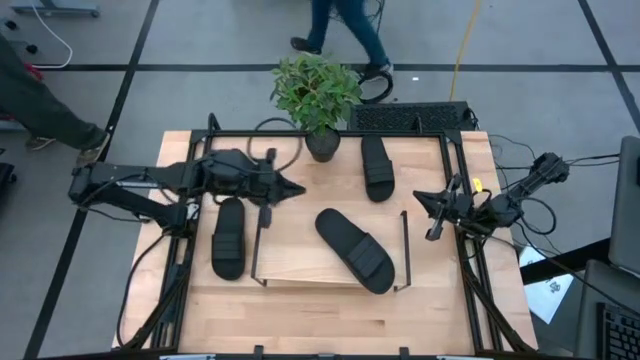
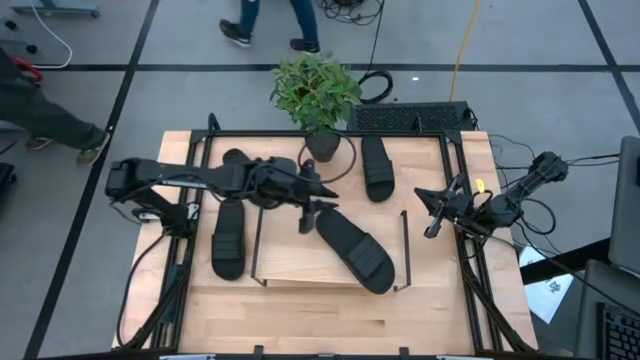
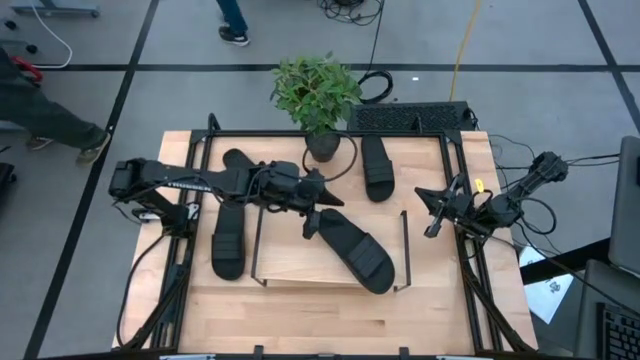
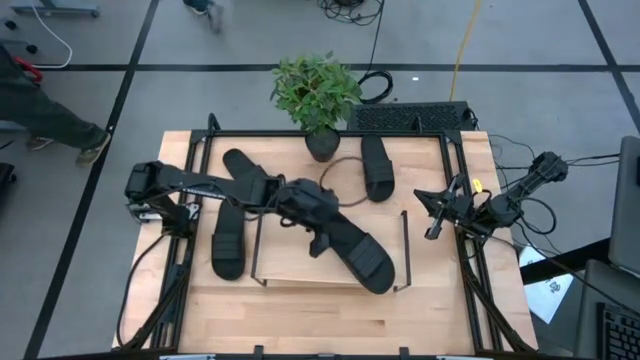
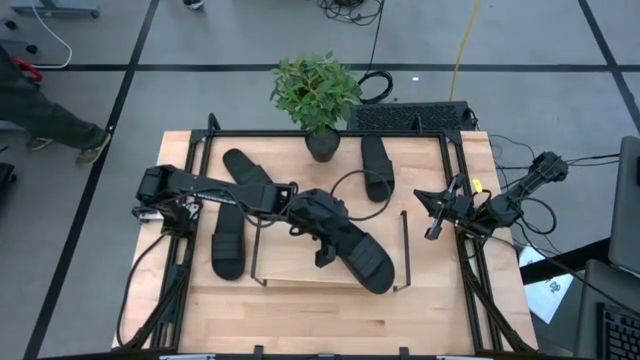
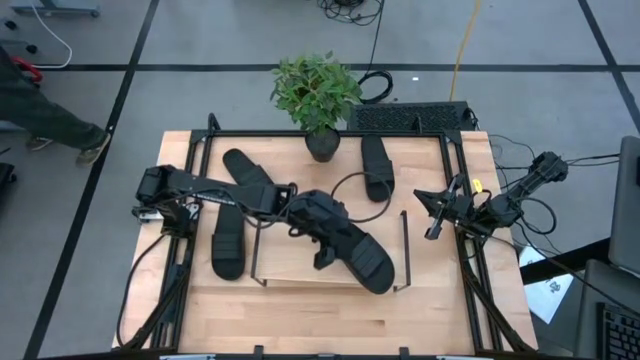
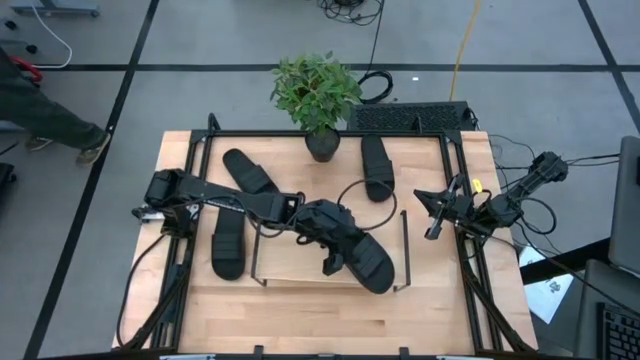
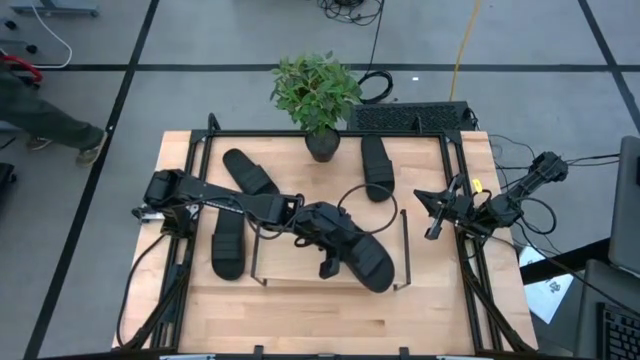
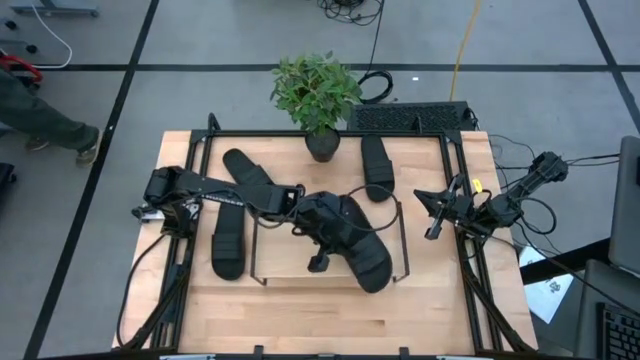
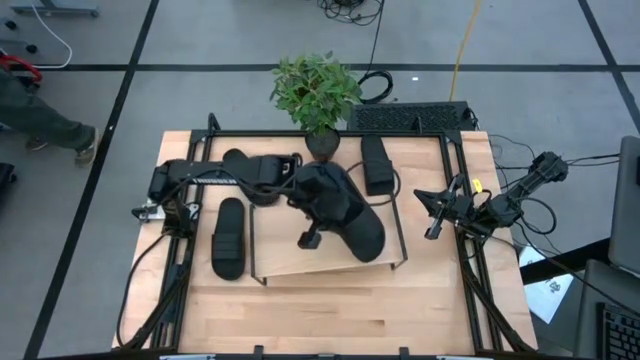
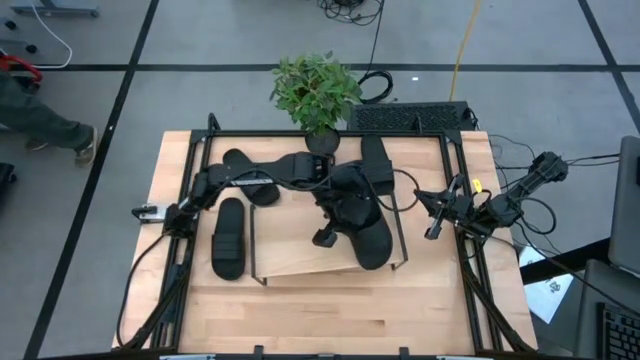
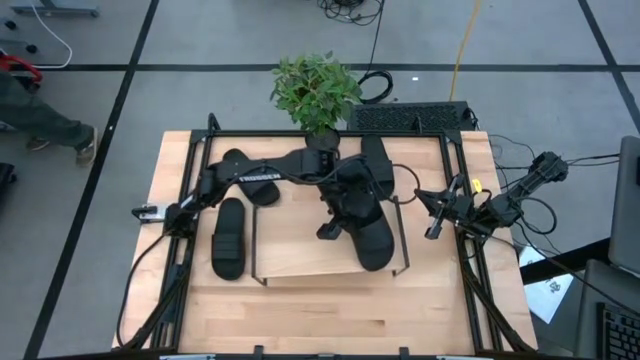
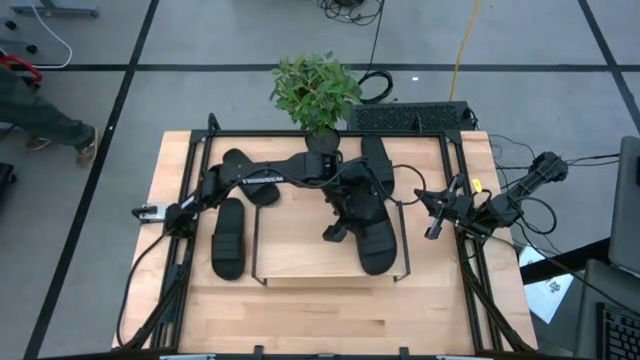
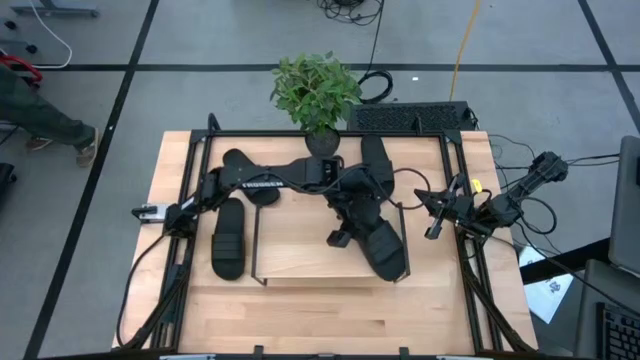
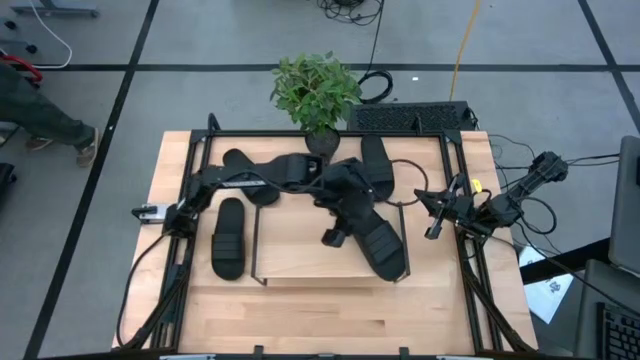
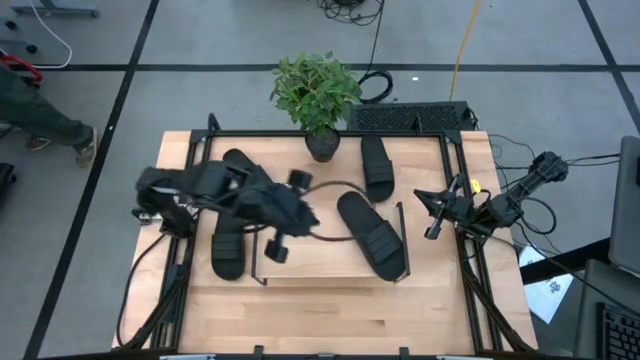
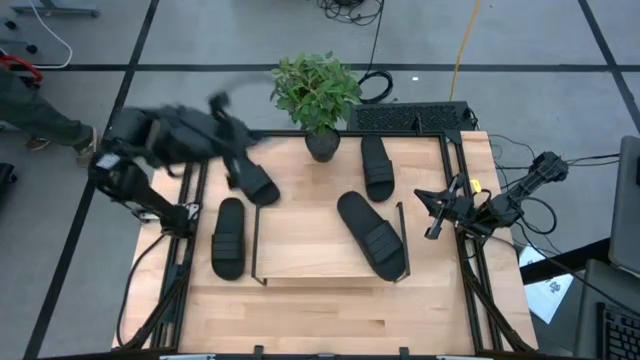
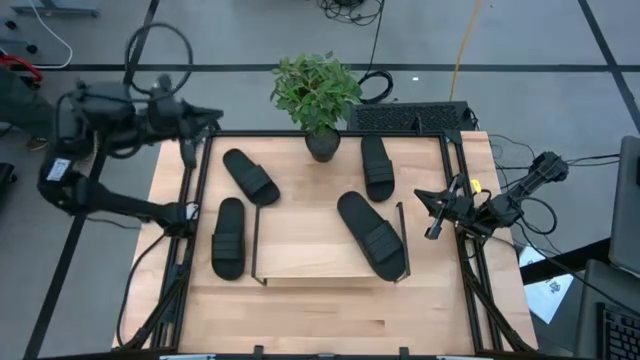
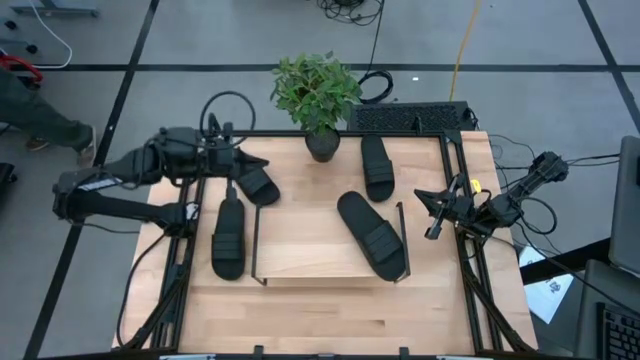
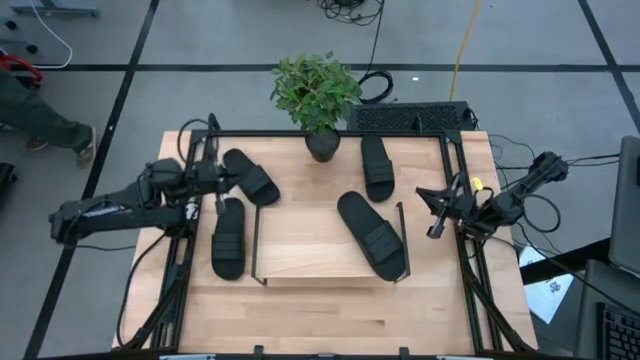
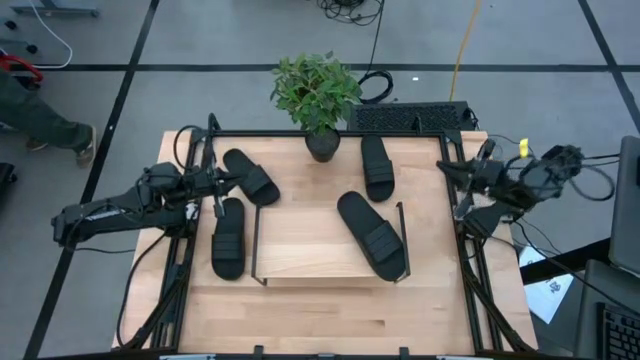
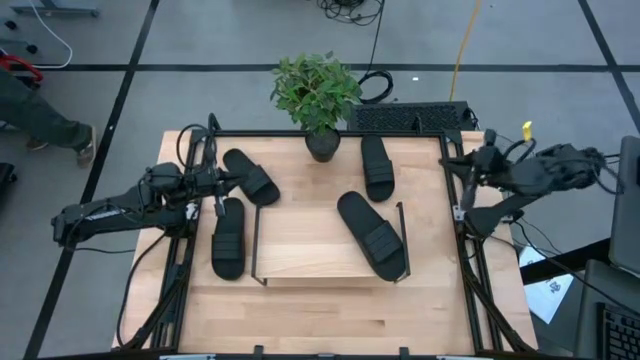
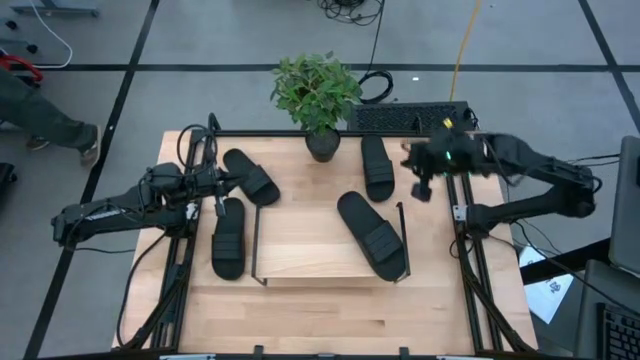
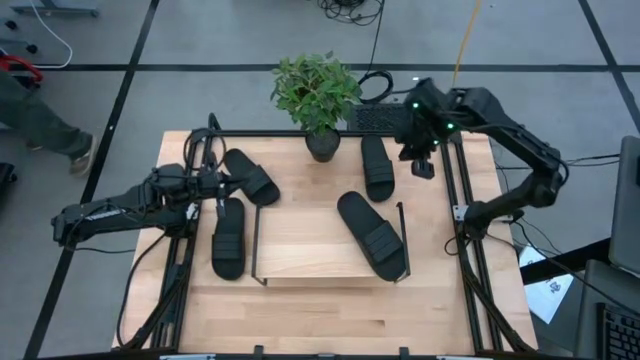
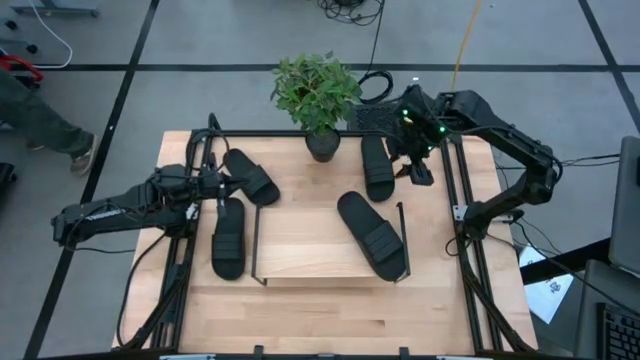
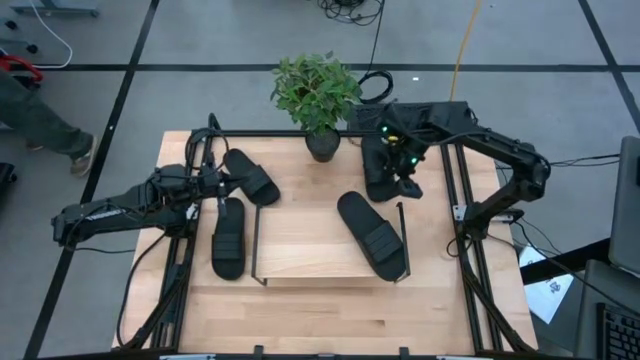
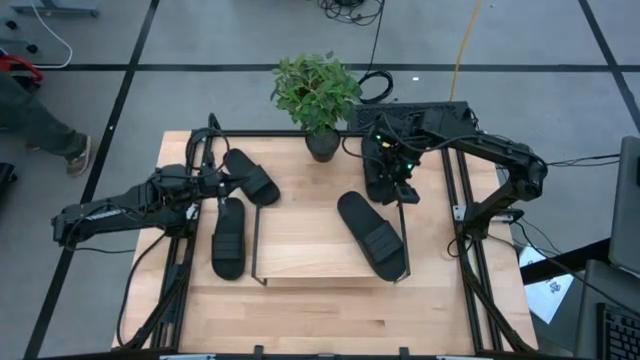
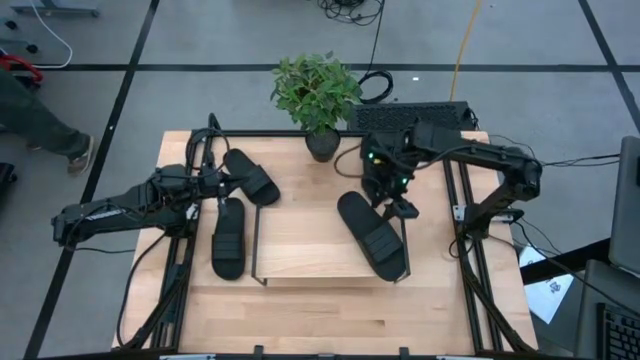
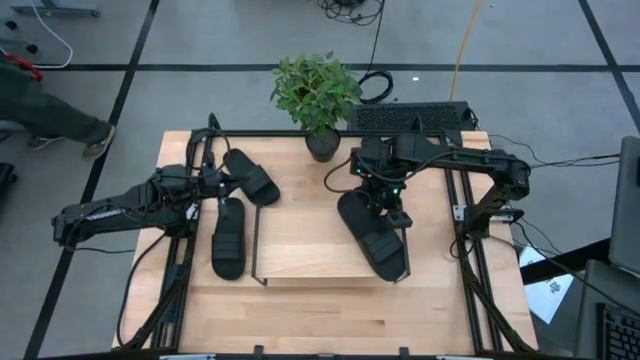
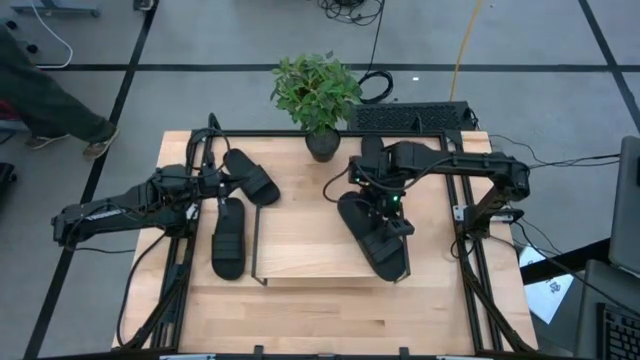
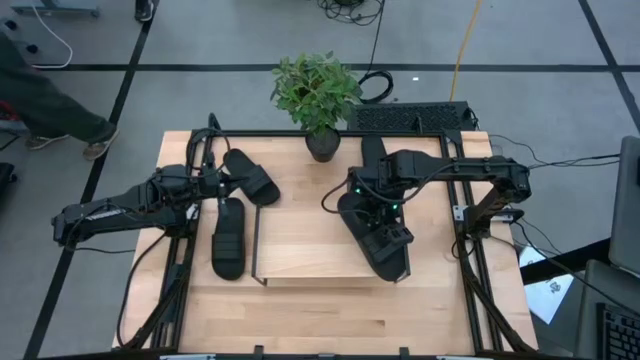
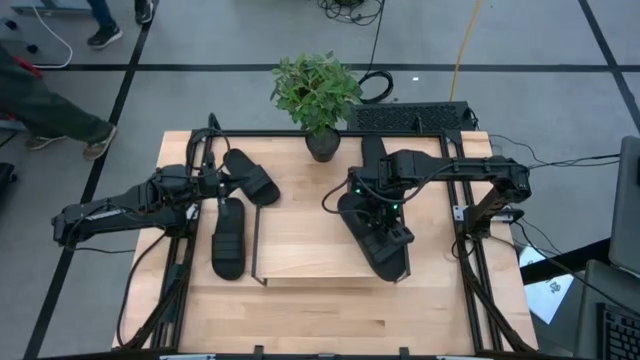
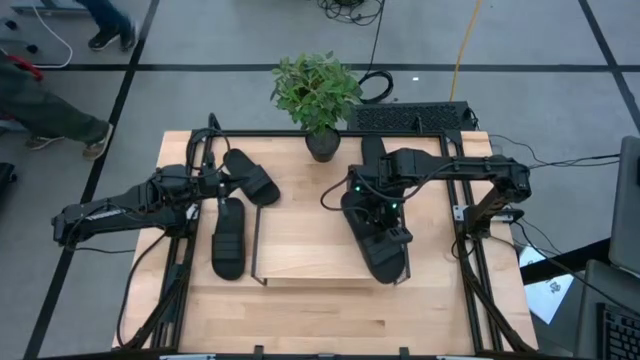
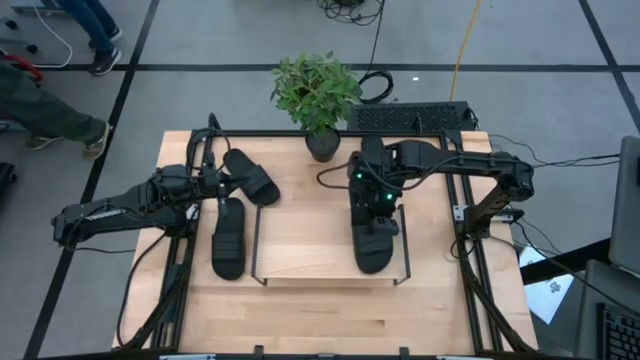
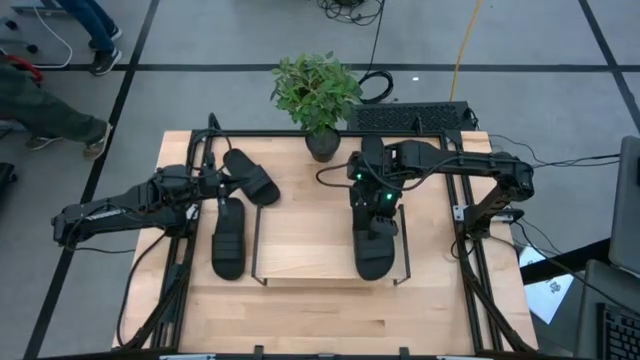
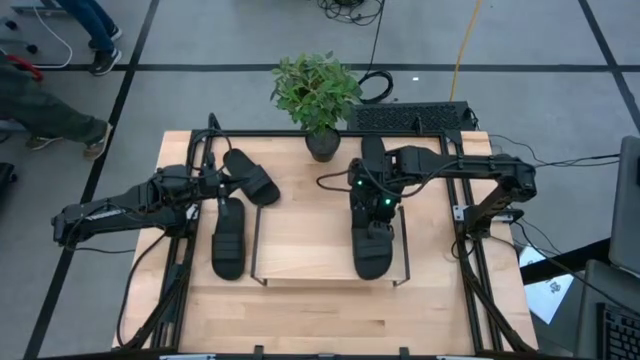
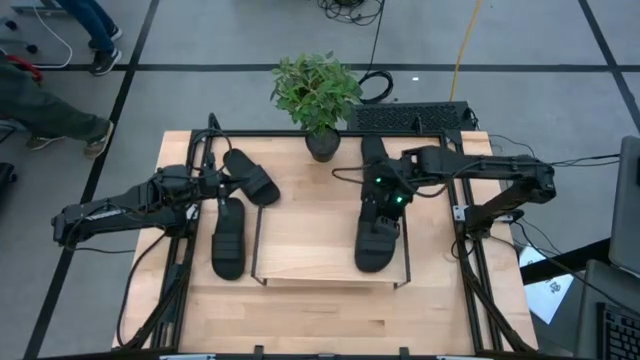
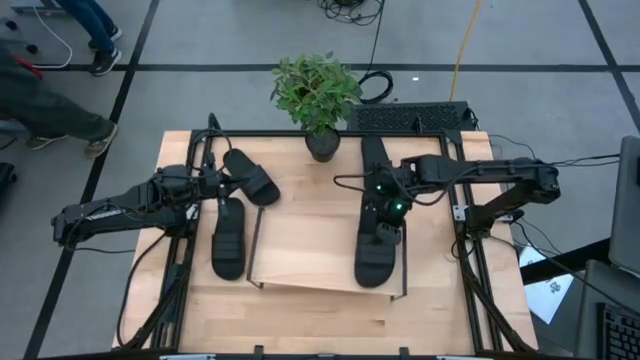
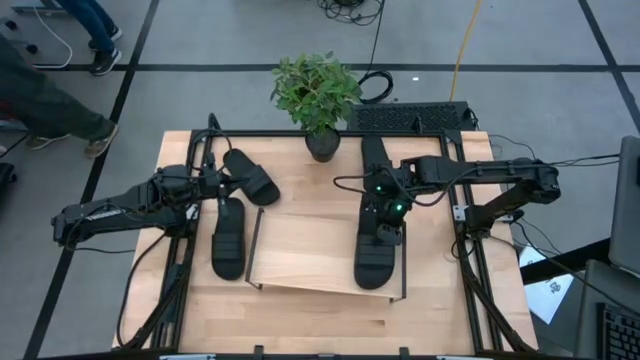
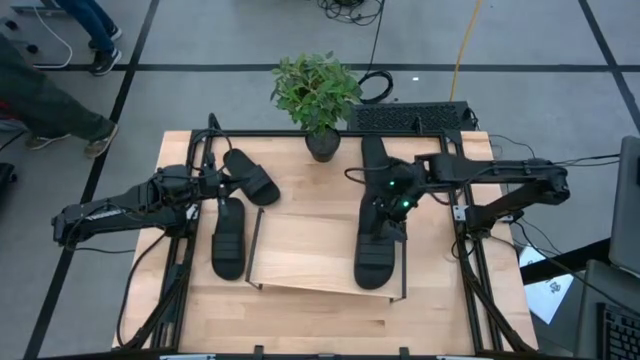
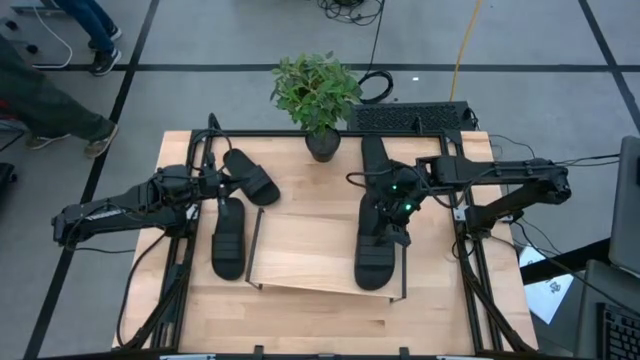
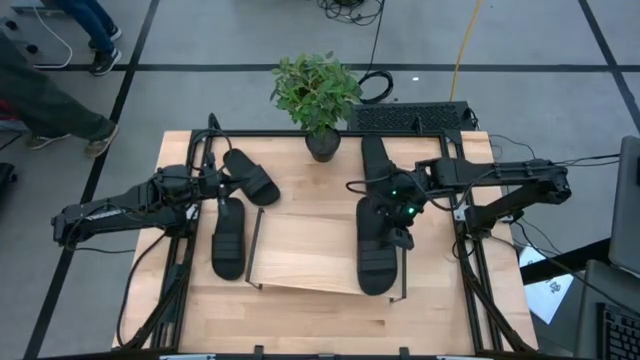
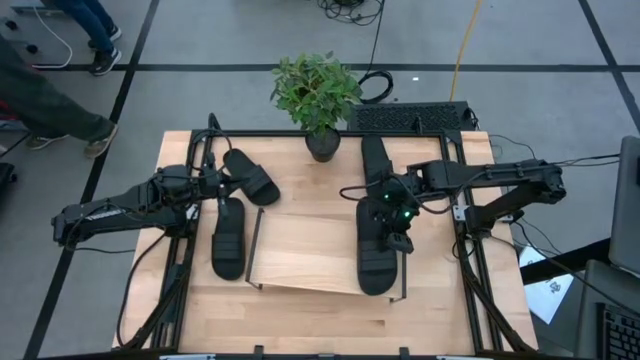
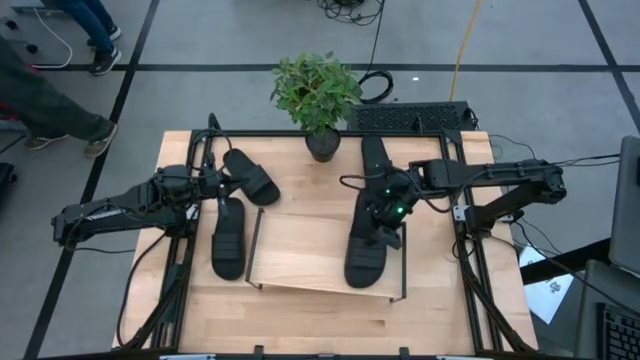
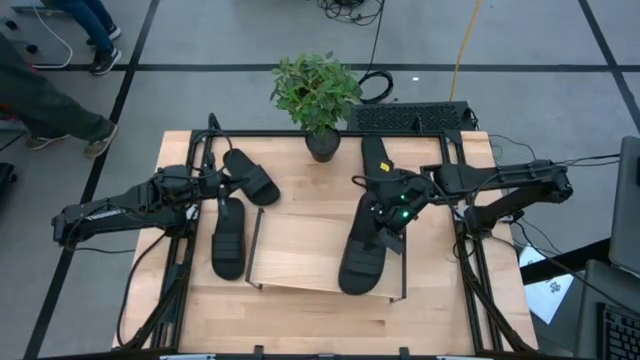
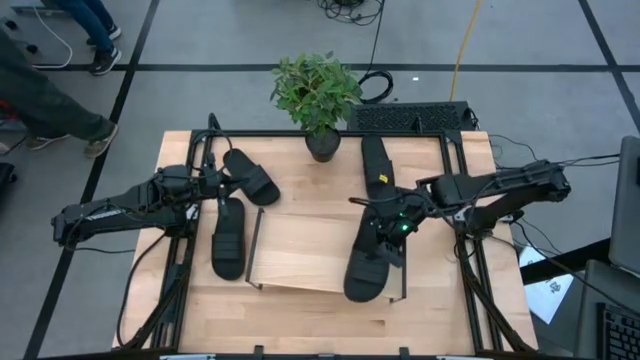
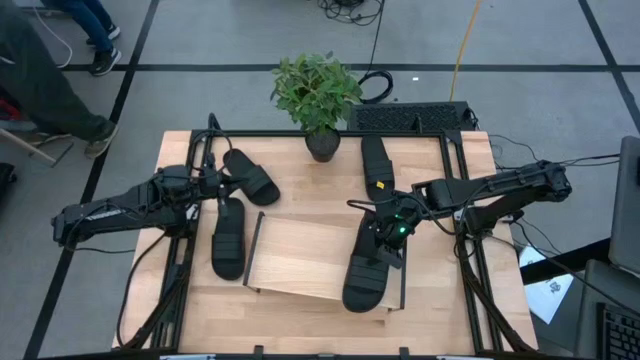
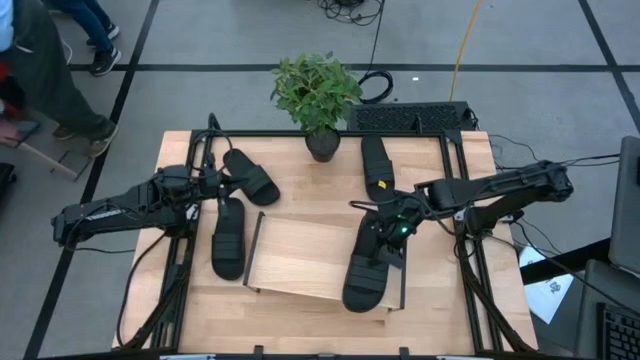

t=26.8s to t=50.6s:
Task: Pick and place slides into the shelf
Put the black slipper on the shelf
